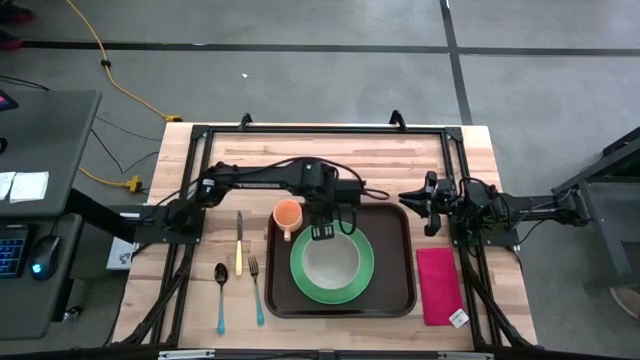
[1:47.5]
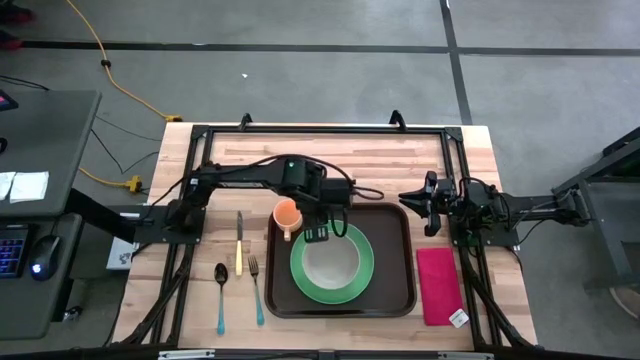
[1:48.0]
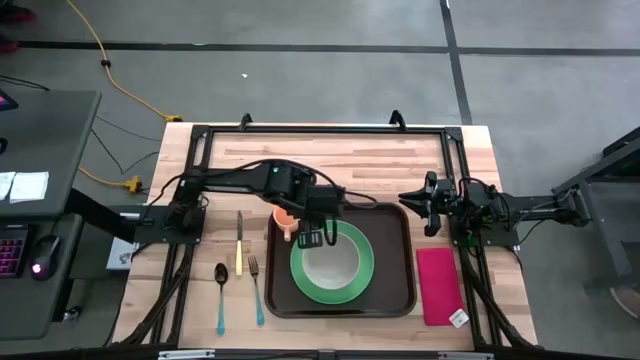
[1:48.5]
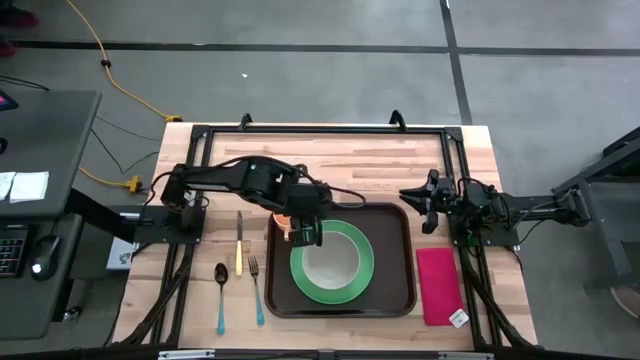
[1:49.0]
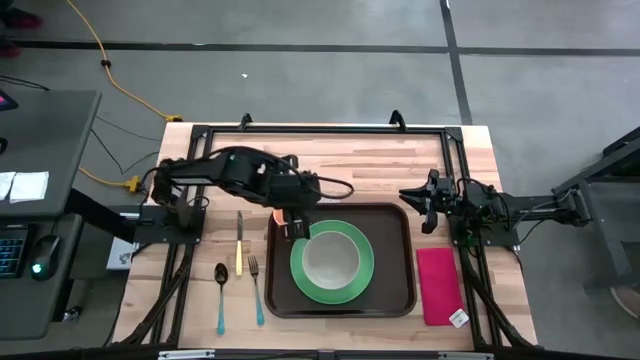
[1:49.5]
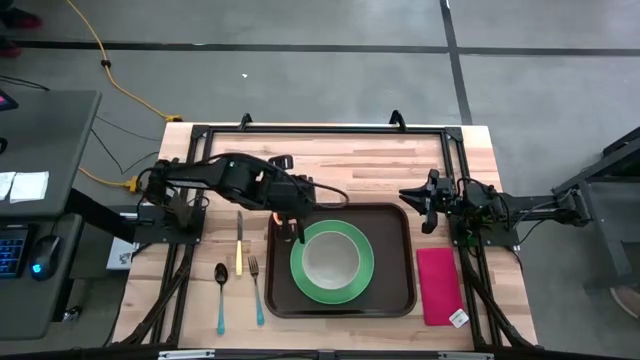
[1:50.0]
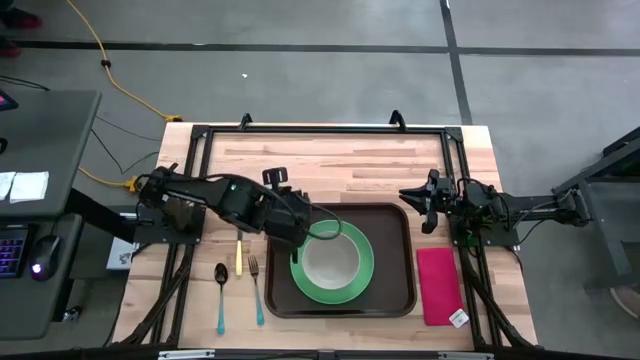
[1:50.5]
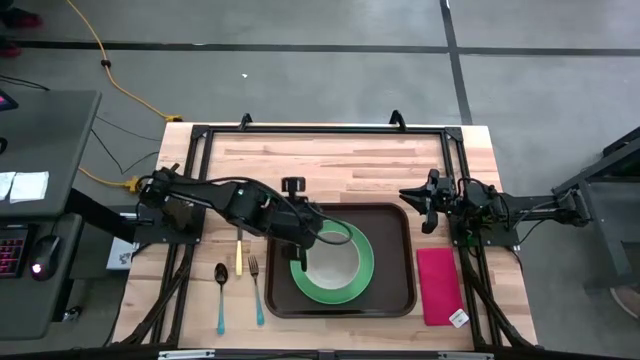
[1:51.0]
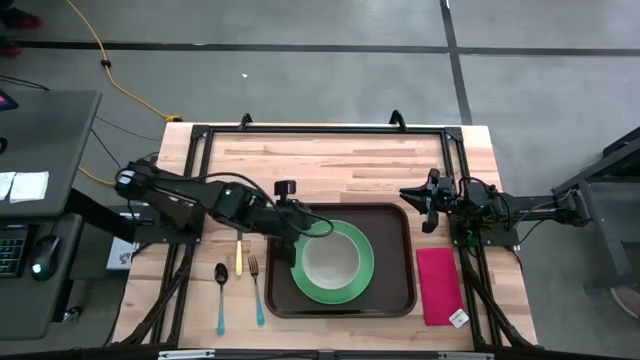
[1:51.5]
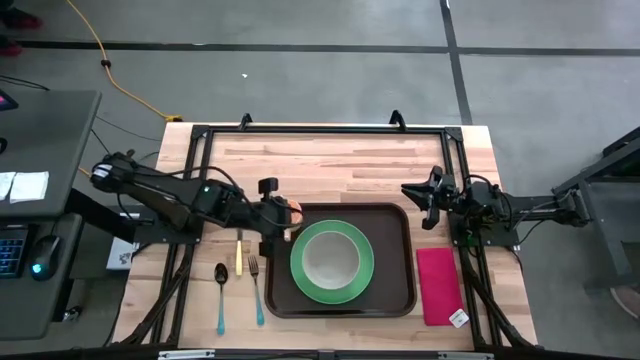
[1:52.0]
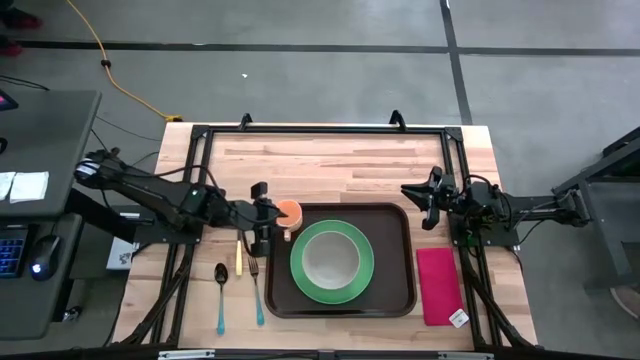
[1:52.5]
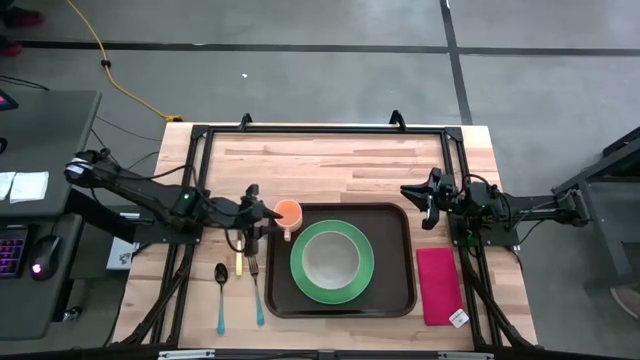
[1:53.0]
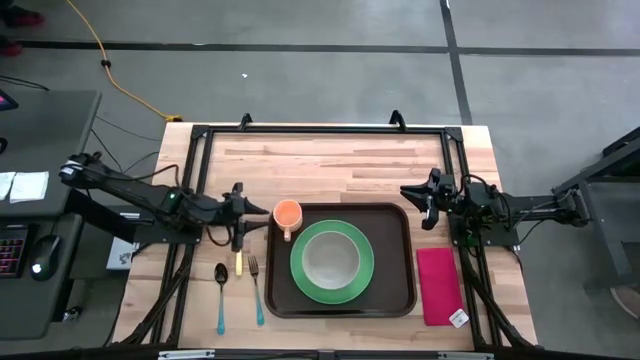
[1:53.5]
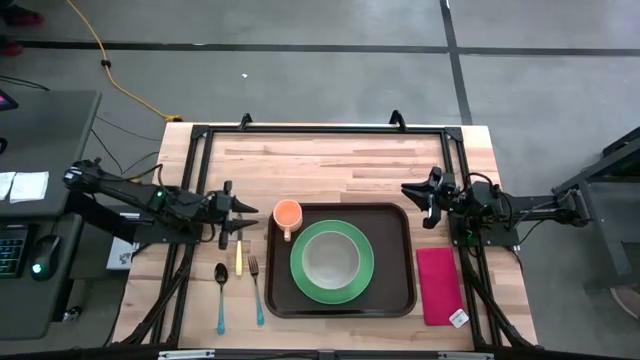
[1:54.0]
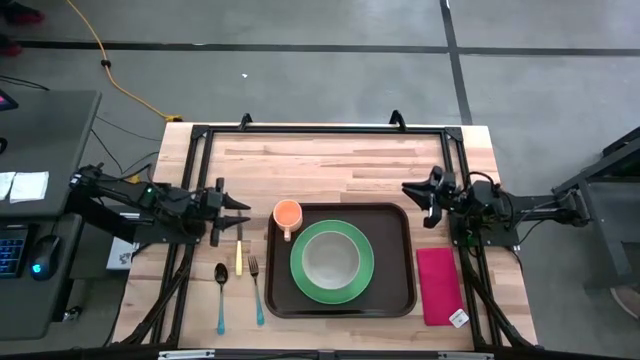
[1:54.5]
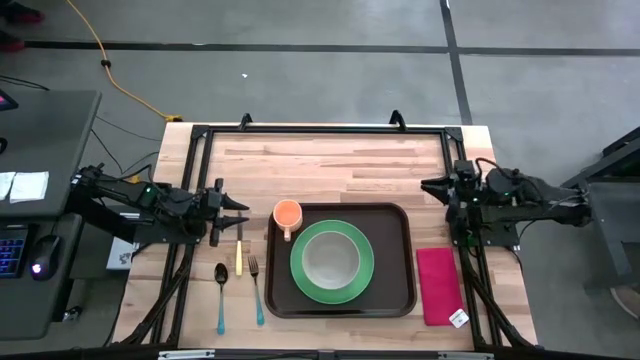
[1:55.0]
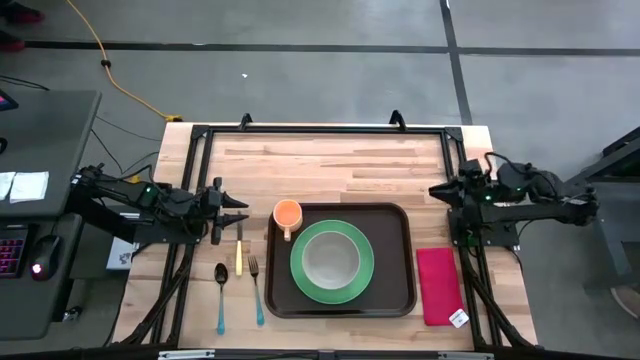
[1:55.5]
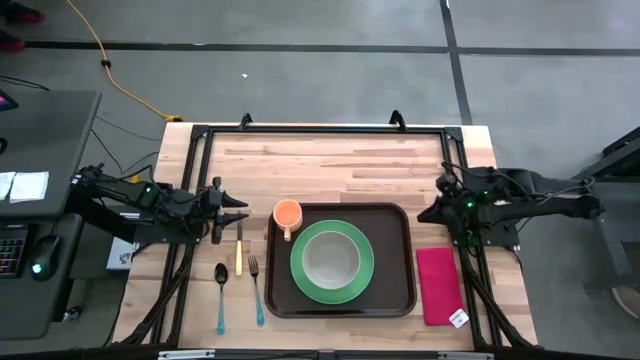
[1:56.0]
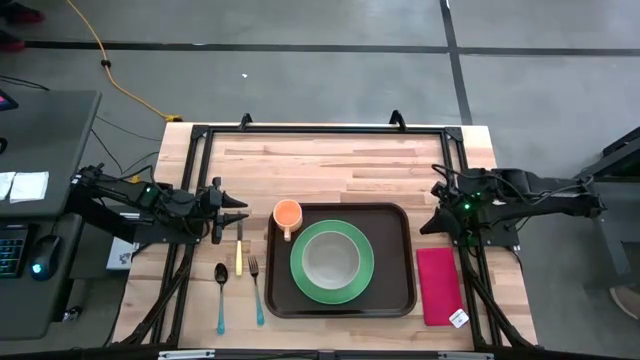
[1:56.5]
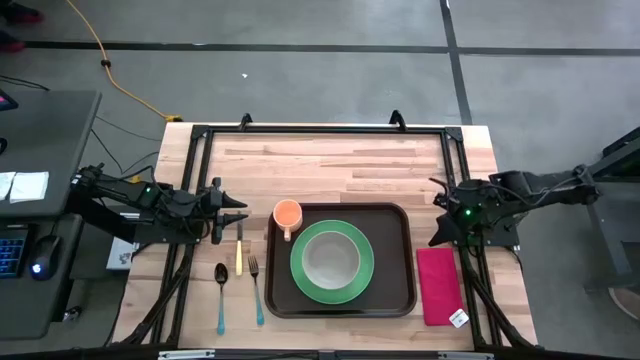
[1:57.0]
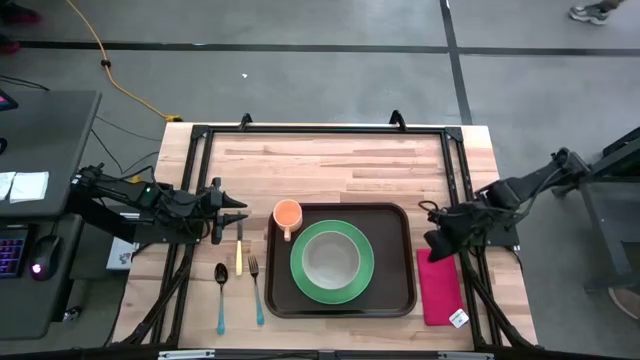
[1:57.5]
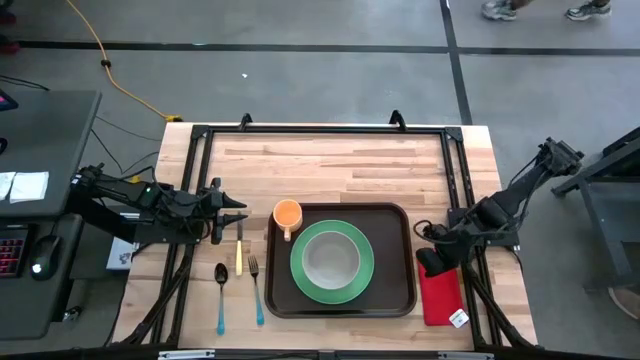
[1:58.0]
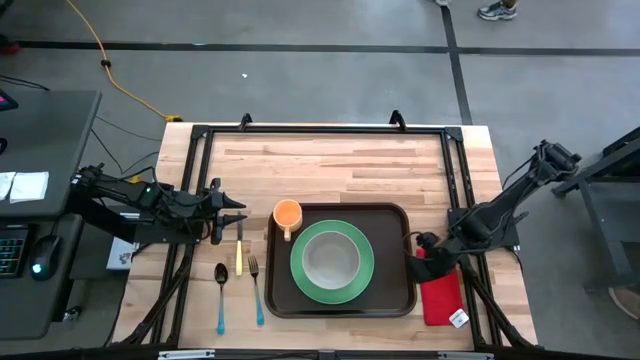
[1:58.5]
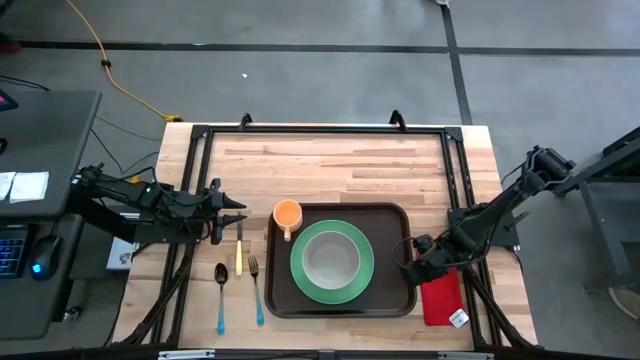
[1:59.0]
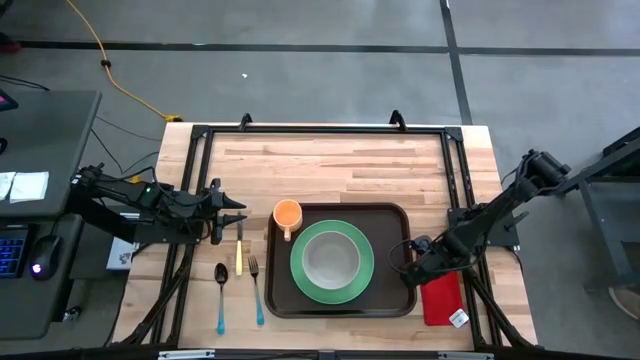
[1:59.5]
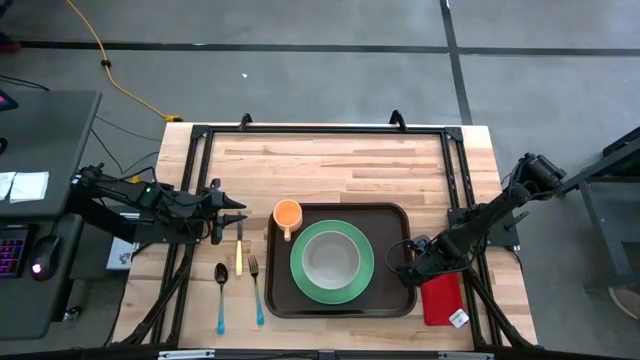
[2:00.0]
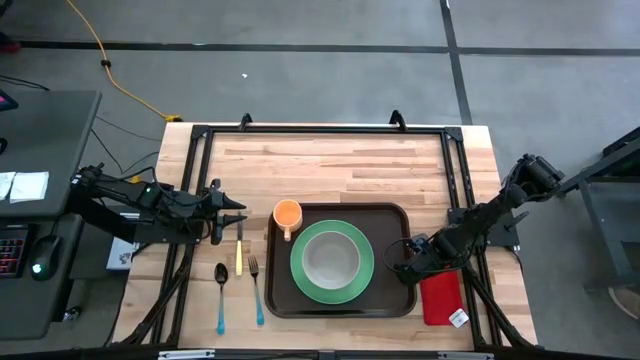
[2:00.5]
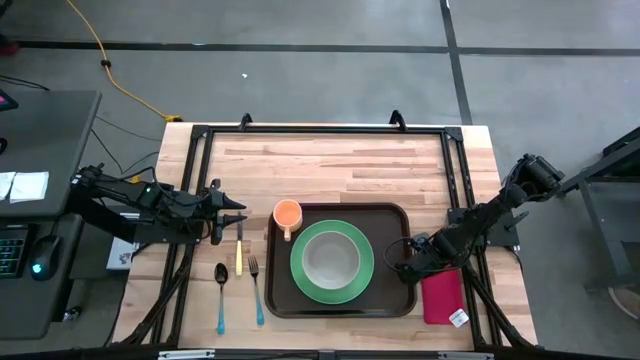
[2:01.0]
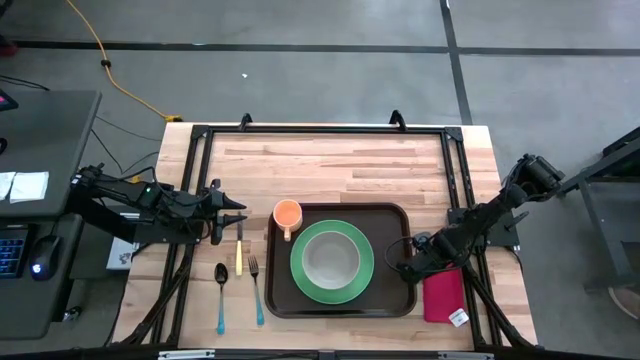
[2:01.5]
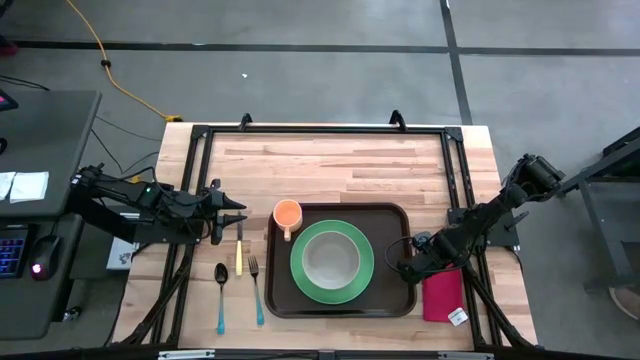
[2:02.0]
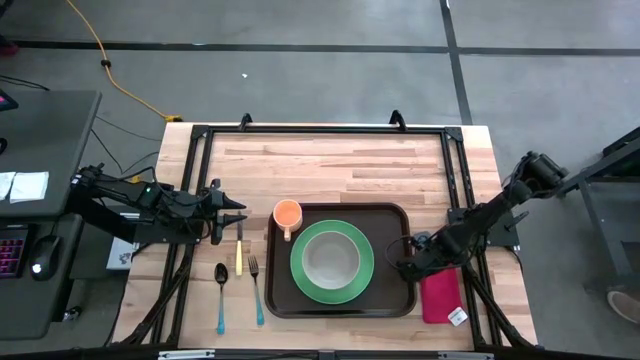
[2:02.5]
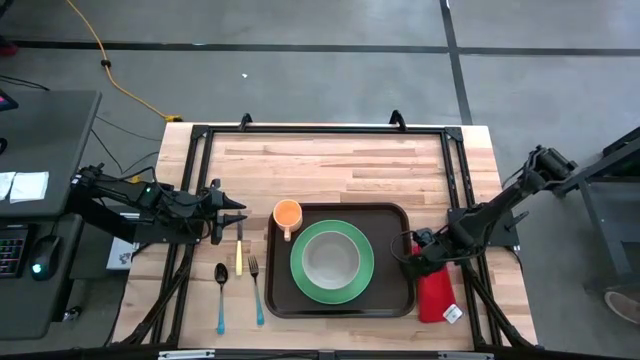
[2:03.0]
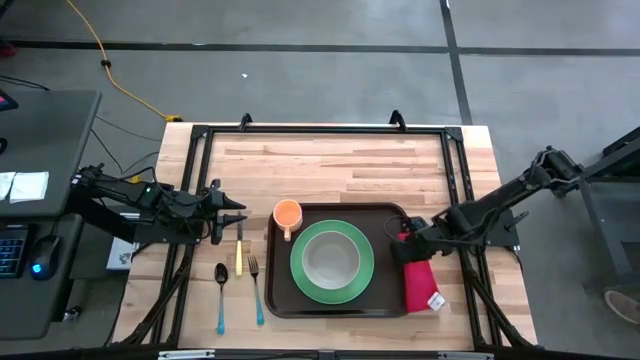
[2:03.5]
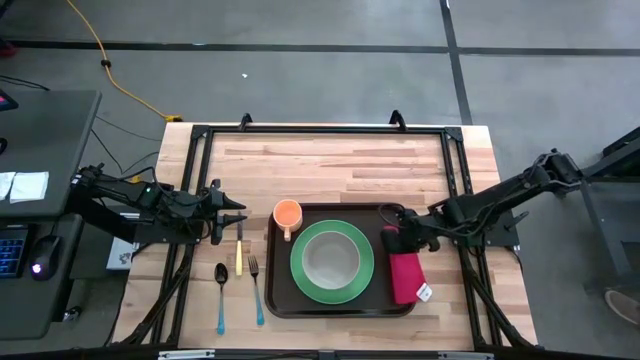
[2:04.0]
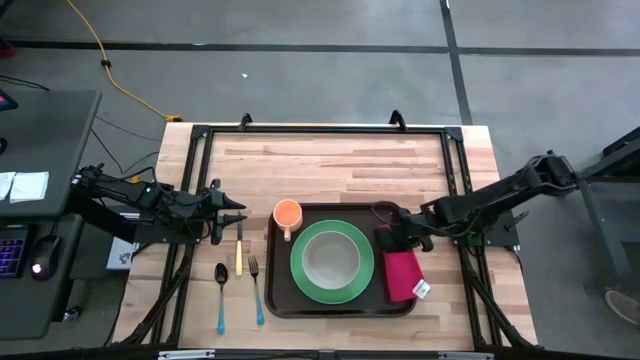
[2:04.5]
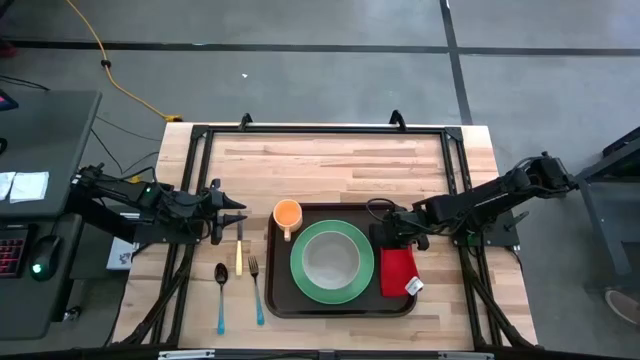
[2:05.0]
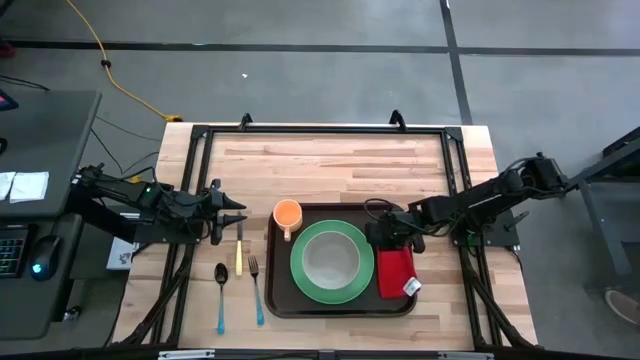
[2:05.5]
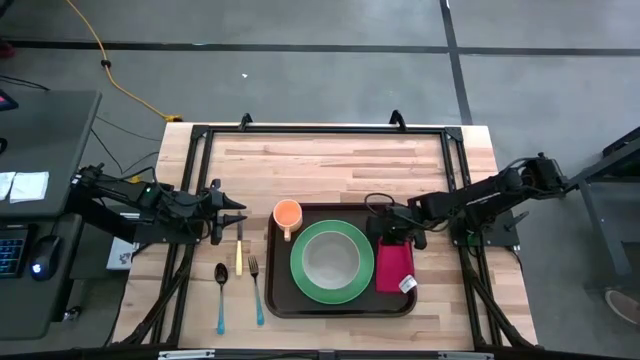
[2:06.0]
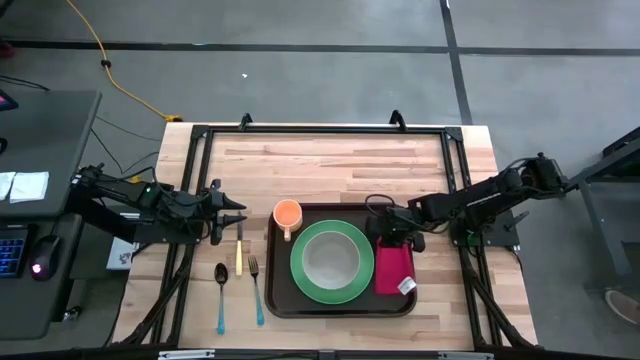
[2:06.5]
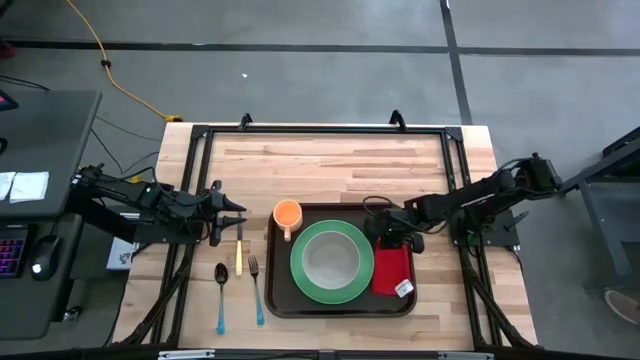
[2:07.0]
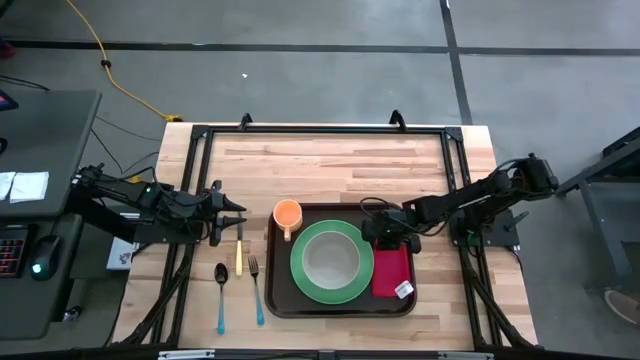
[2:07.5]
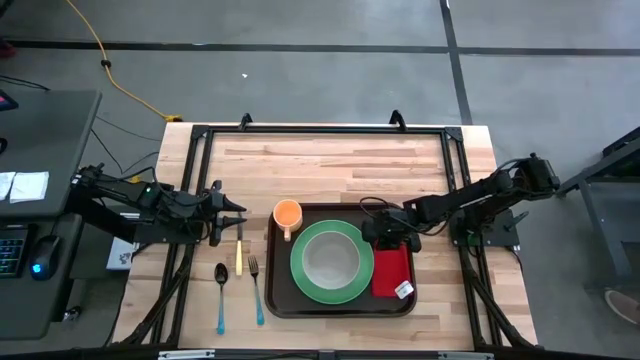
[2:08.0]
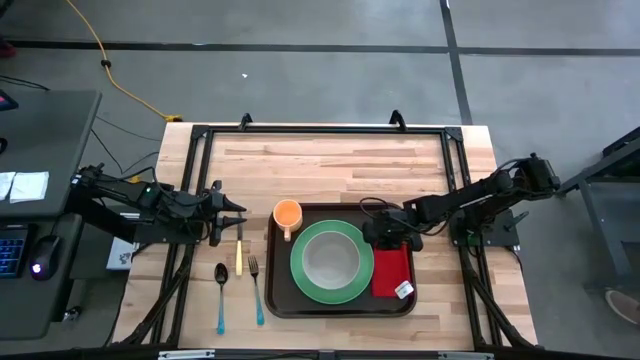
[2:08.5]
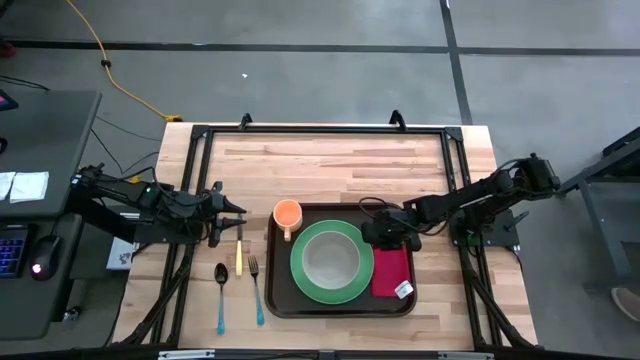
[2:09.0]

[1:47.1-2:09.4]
Task: Set up tray
Put the red napkin to the right of the green plate on the brown tray
